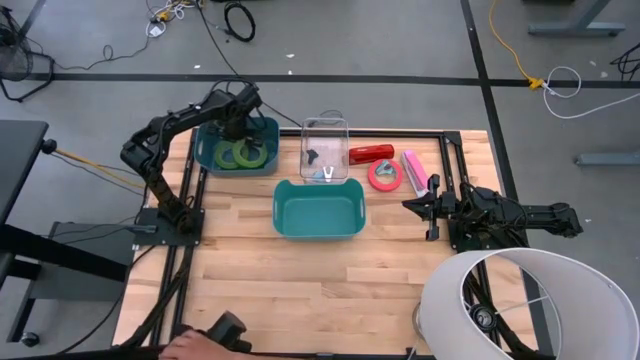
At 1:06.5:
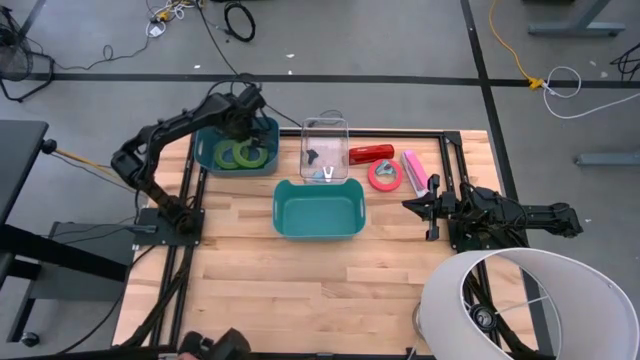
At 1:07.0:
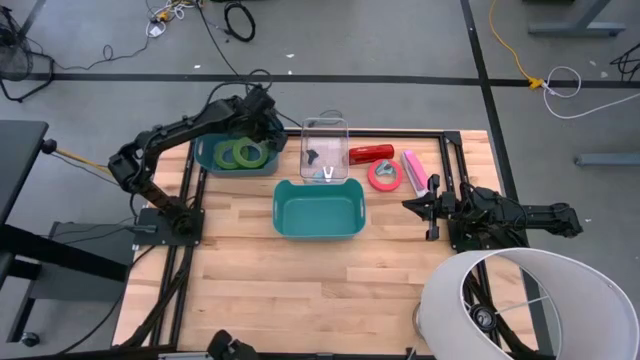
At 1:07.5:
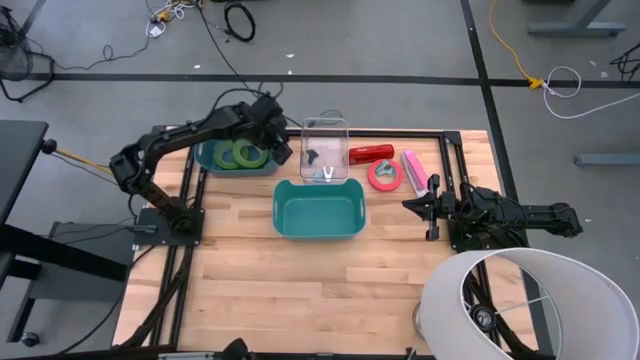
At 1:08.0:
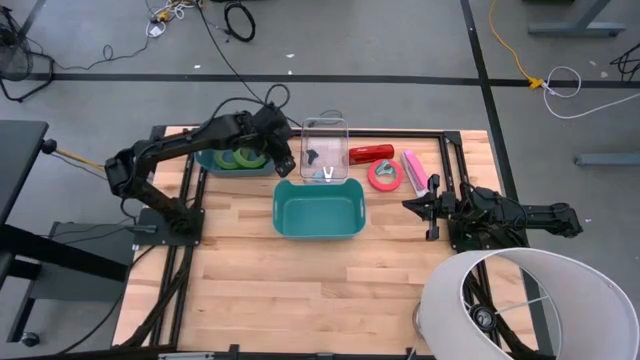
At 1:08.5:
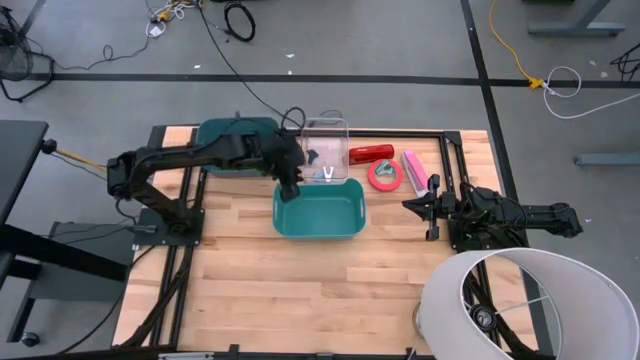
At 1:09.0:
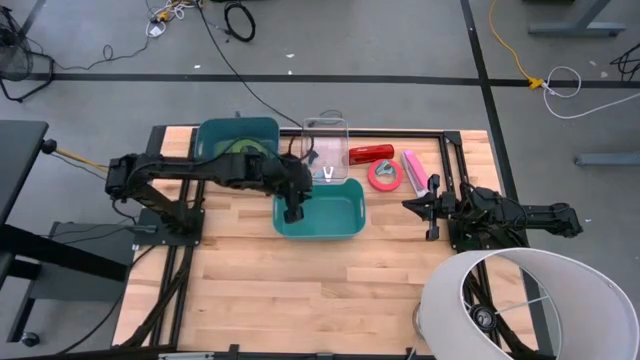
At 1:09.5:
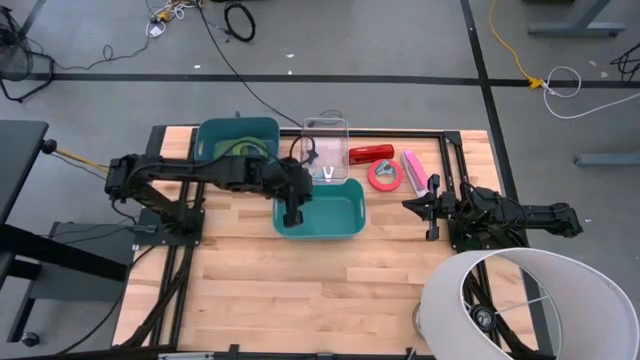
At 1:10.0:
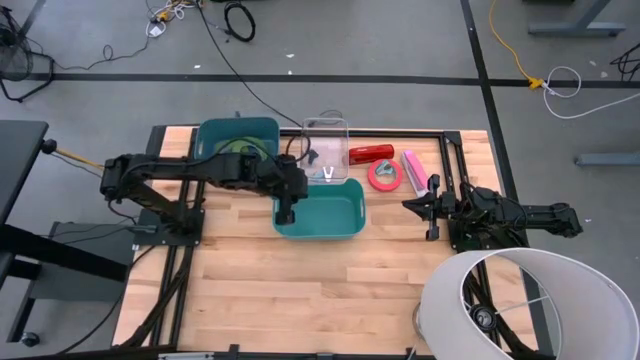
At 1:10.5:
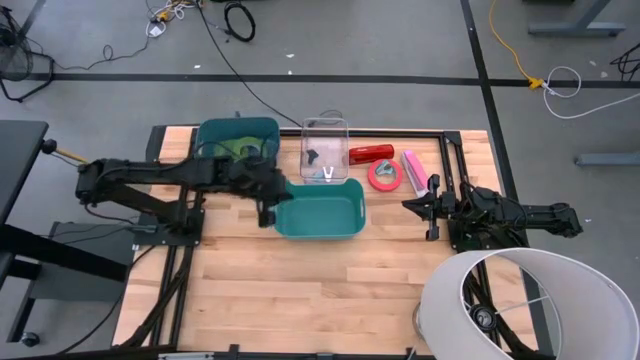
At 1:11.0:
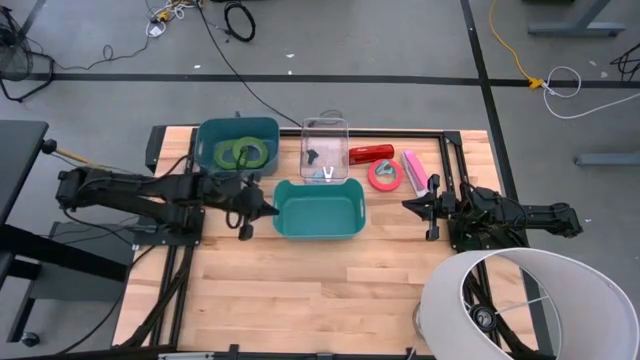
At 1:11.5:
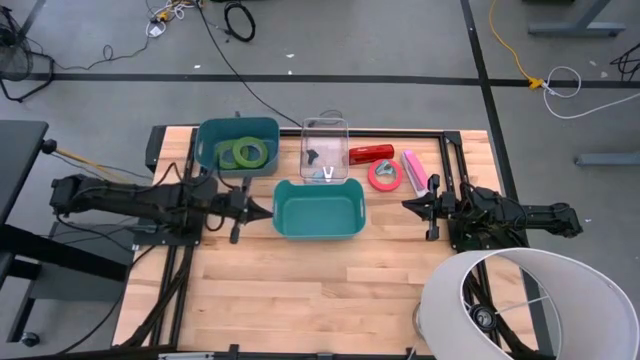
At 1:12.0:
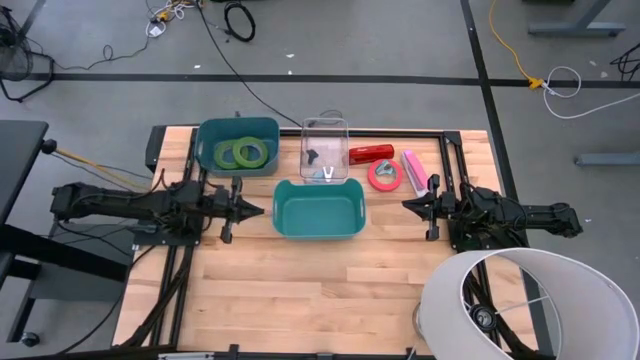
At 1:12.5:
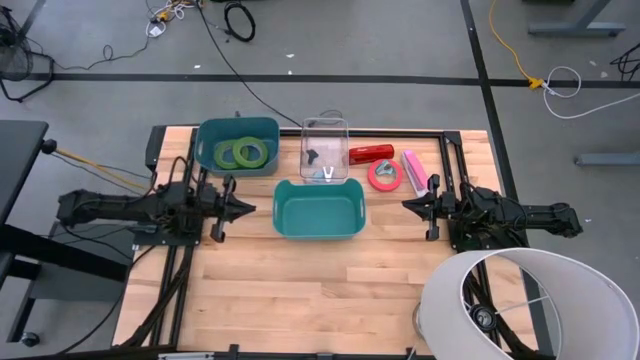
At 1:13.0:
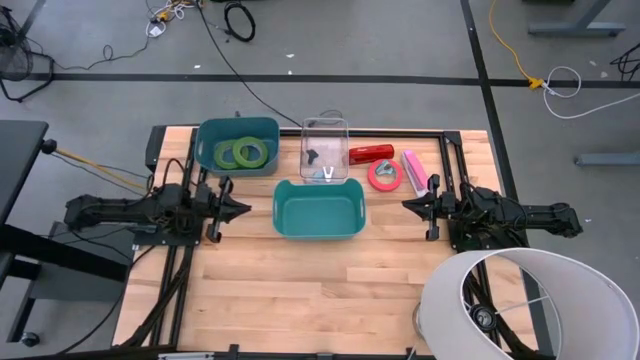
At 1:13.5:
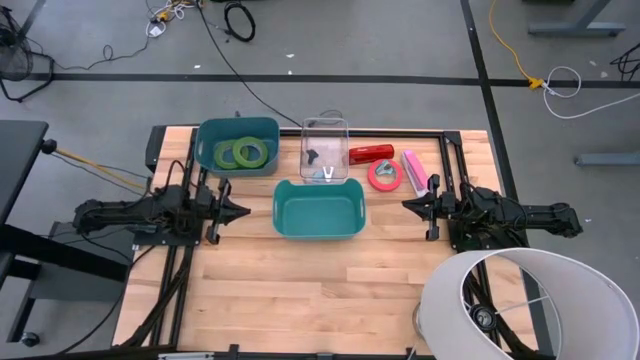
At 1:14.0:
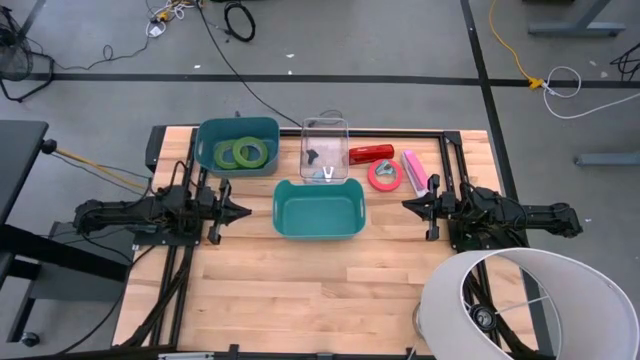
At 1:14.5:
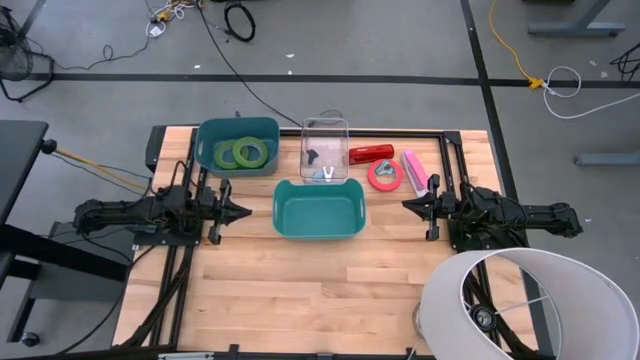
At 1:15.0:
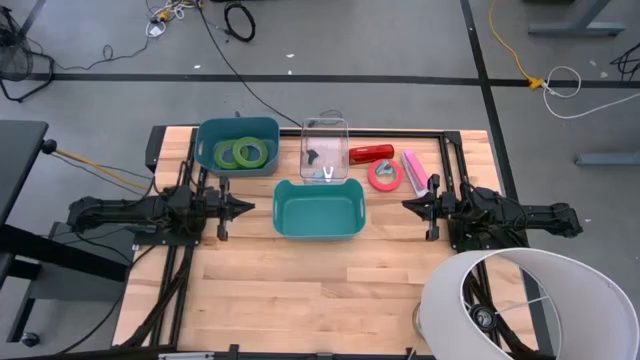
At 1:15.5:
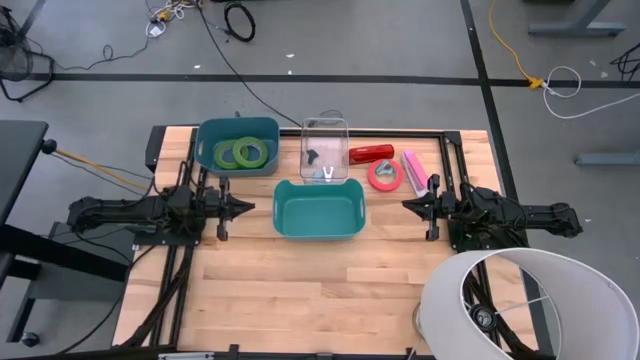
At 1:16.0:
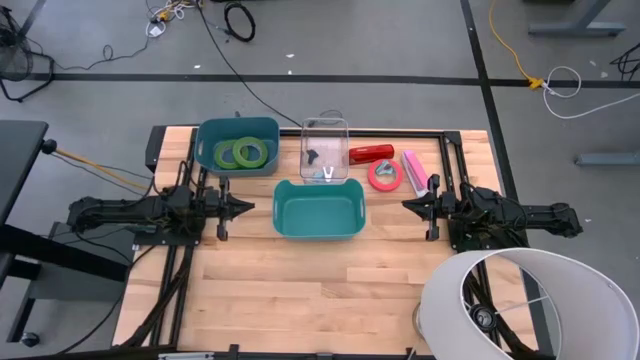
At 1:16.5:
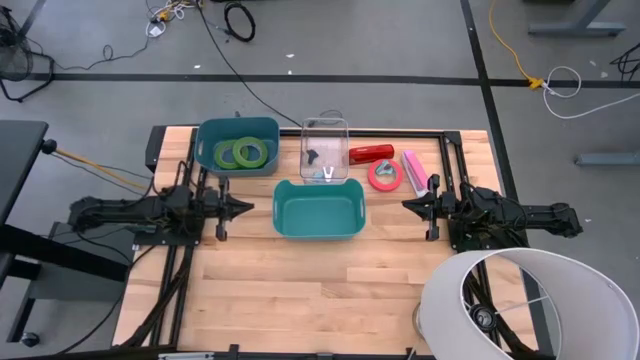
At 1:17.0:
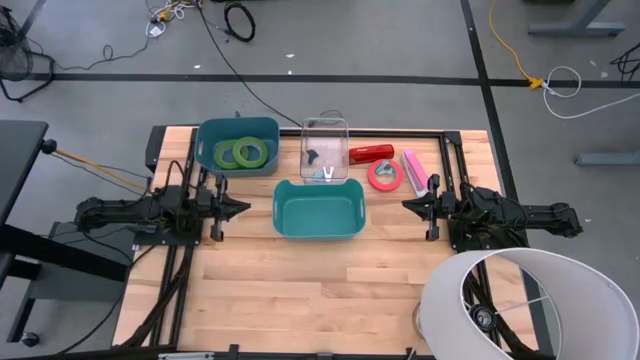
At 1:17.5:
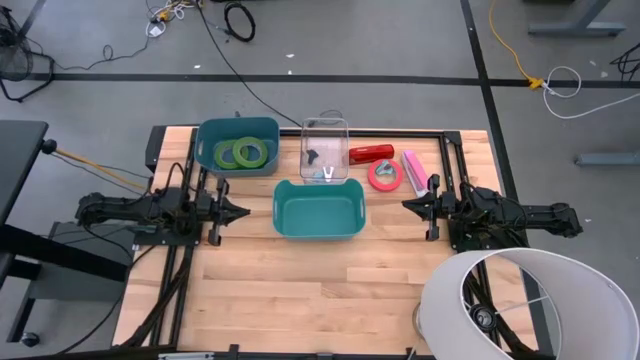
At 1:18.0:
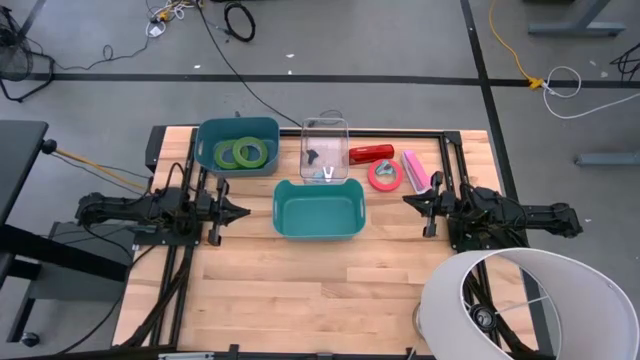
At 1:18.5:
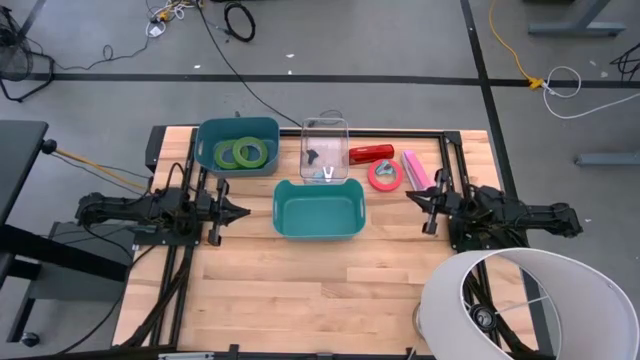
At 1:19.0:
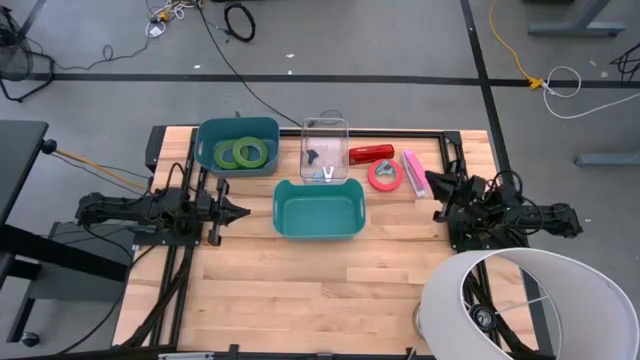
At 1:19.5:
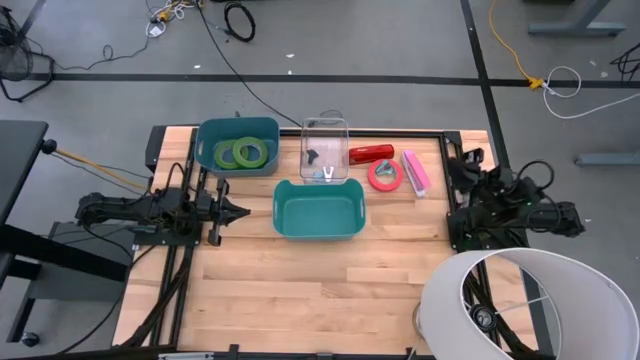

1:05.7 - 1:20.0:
Task: Pick and place Stapler, Stapler remover, tape
Put the light blue staple remover into the transparent bin

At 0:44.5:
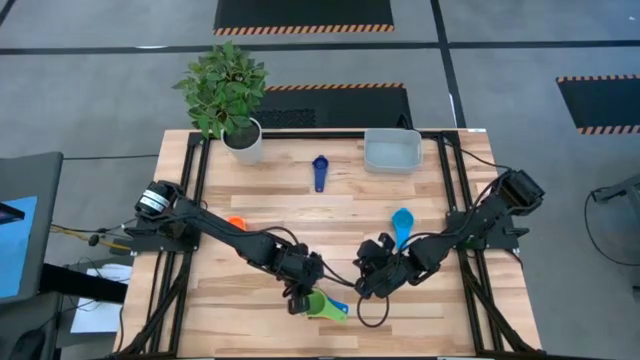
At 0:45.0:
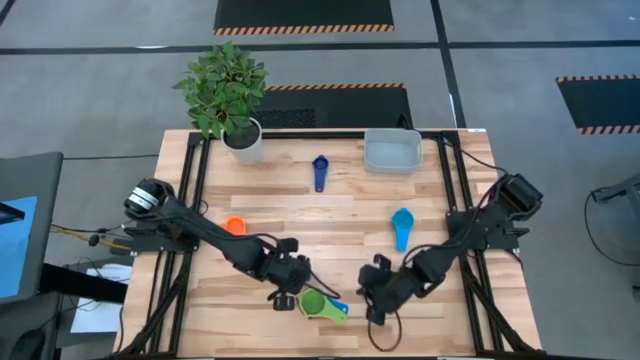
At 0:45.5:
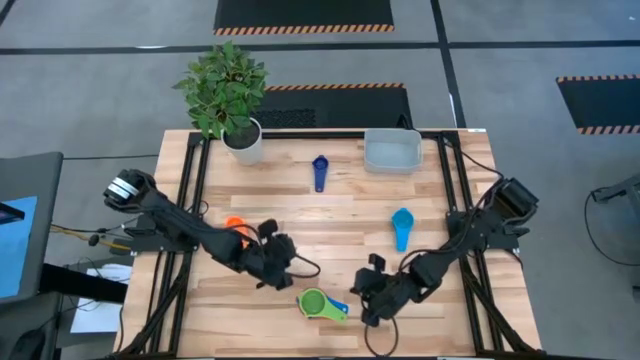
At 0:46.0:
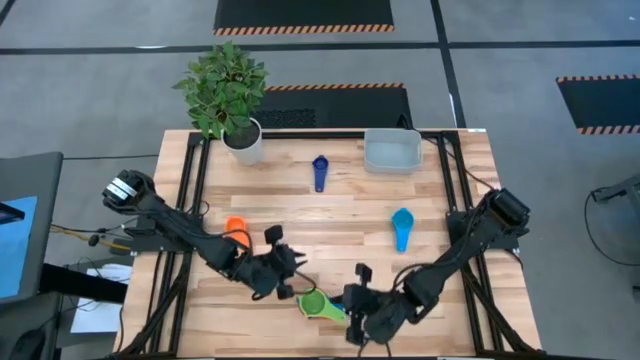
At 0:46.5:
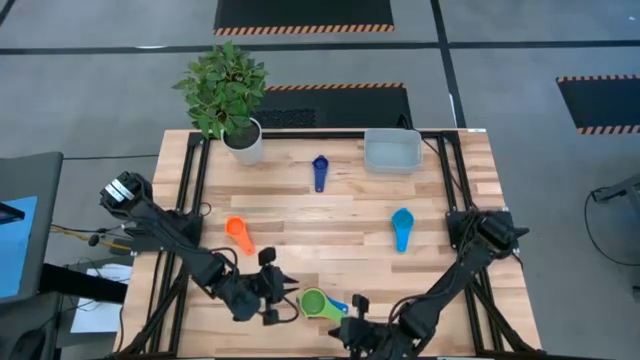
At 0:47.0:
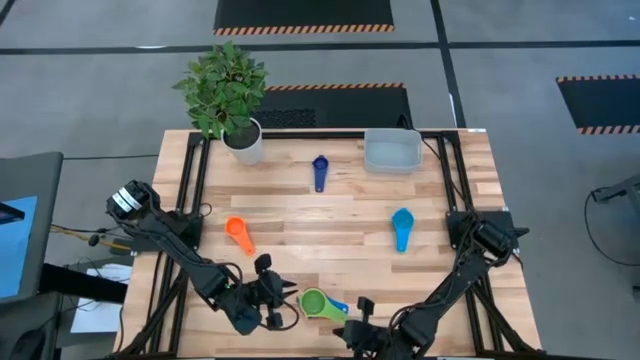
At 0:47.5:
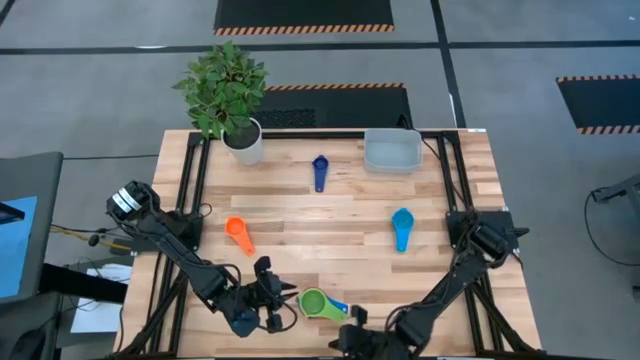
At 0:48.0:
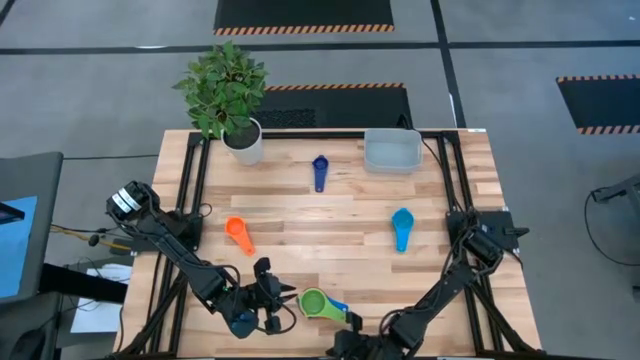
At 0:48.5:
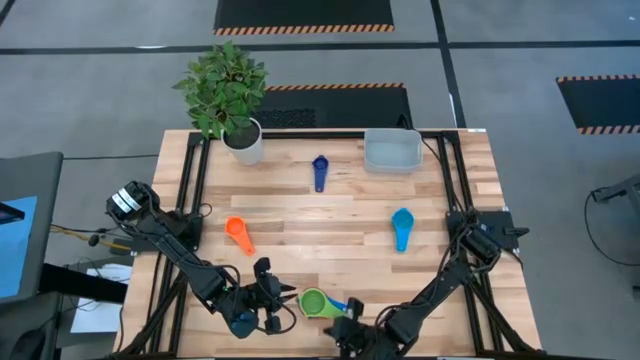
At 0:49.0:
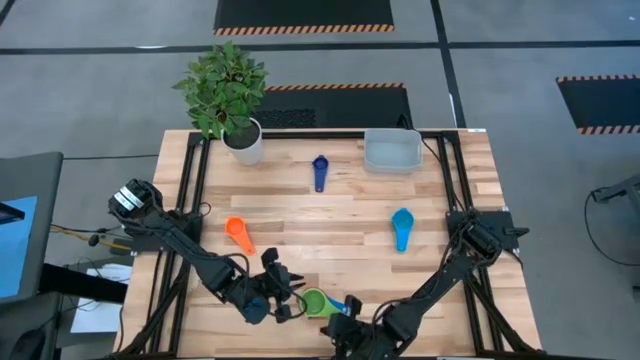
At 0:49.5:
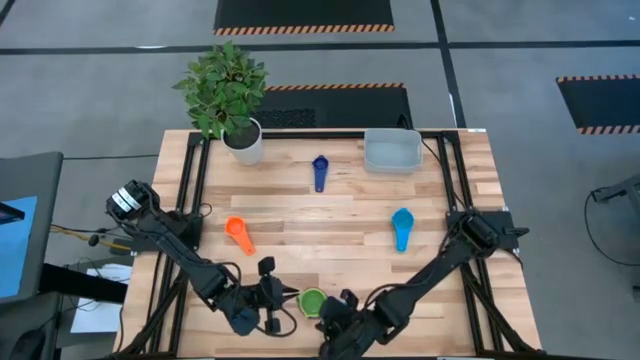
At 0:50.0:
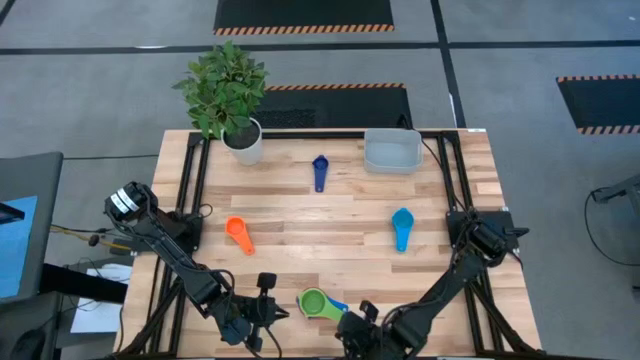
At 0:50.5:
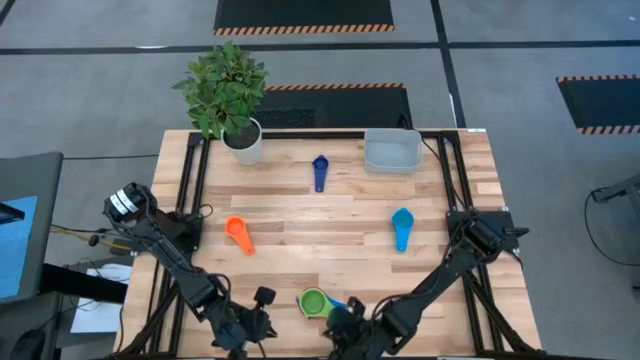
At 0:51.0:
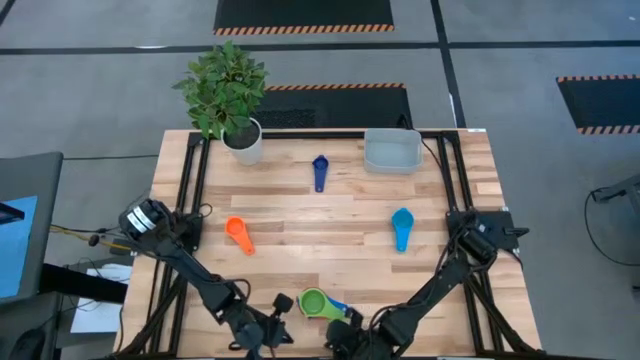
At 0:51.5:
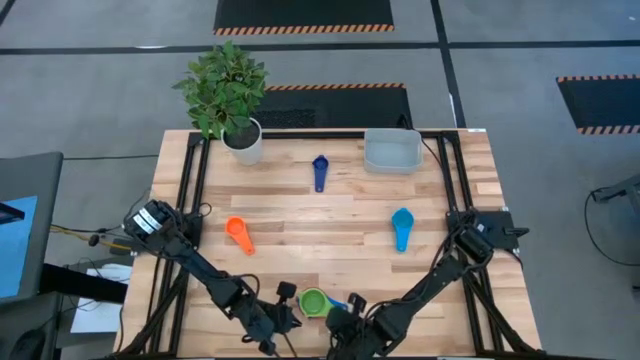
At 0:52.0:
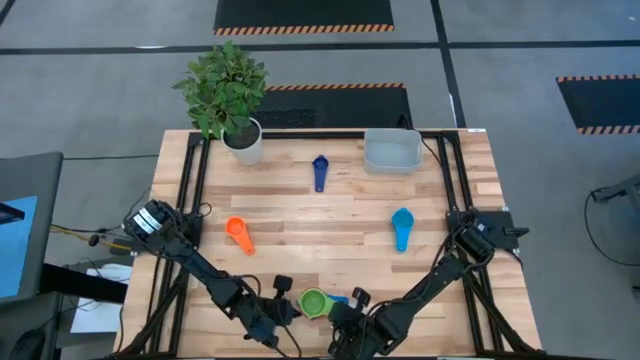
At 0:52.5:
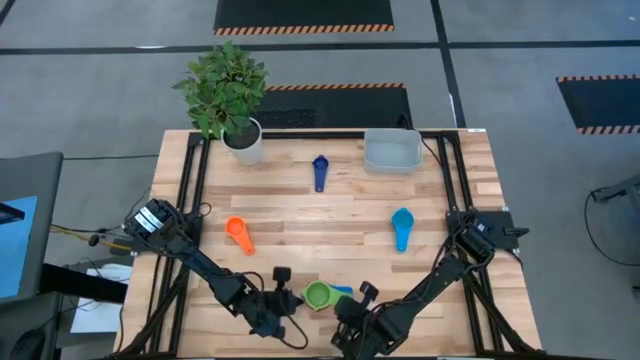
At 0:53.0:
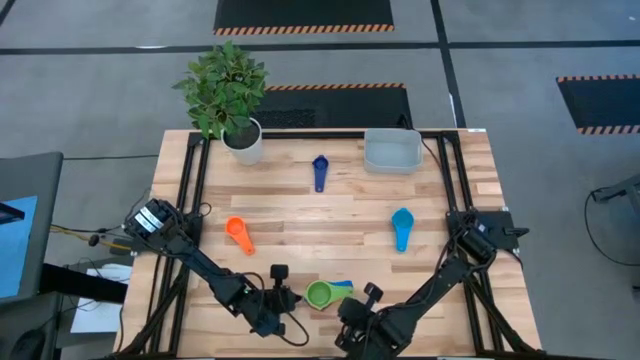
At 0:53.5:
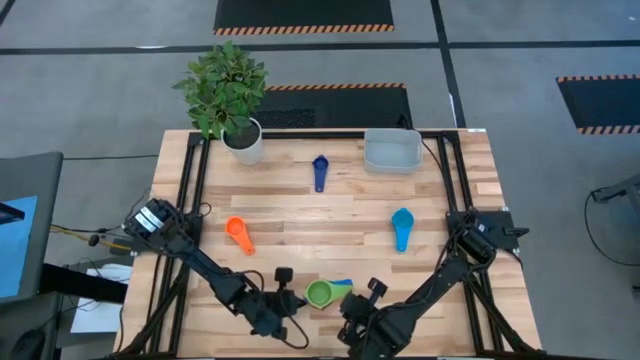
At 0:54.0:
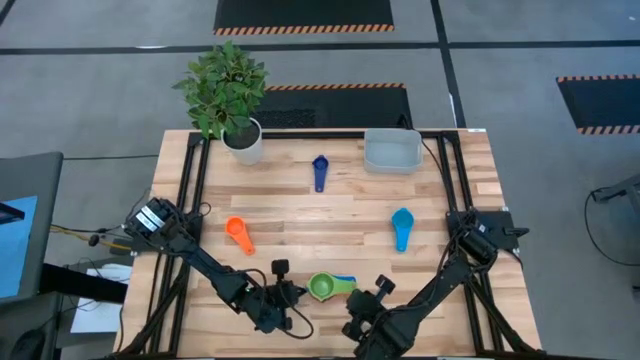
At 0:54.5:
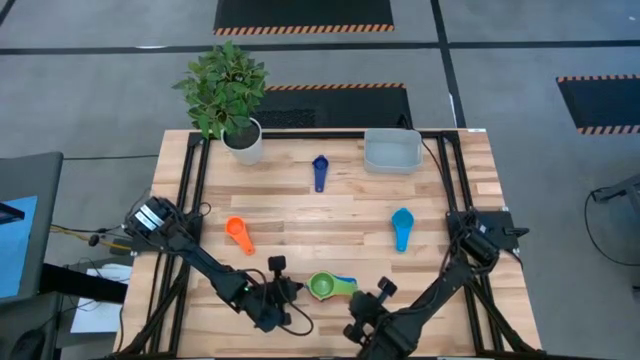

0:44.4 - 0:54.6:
Task: Nest measuring cups in basket
Move the stacked measuring cups towards the center of the table
